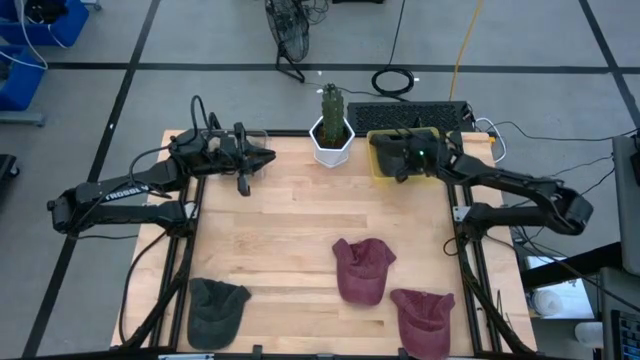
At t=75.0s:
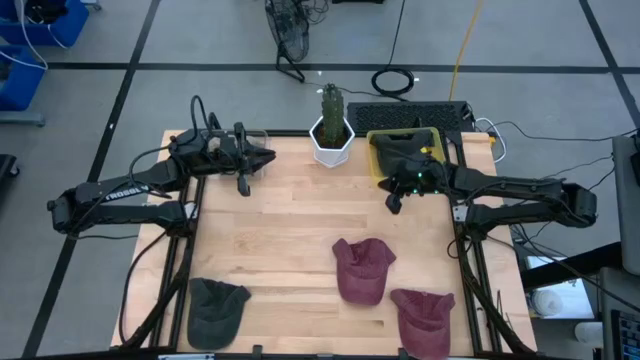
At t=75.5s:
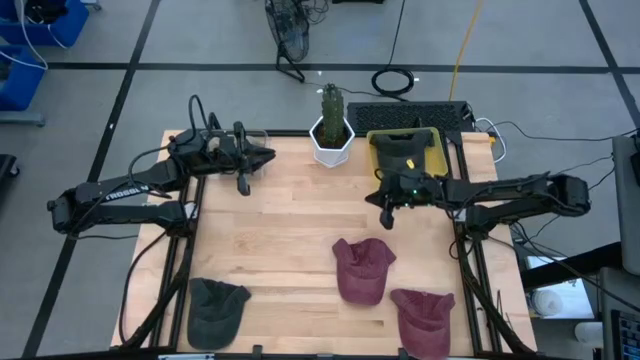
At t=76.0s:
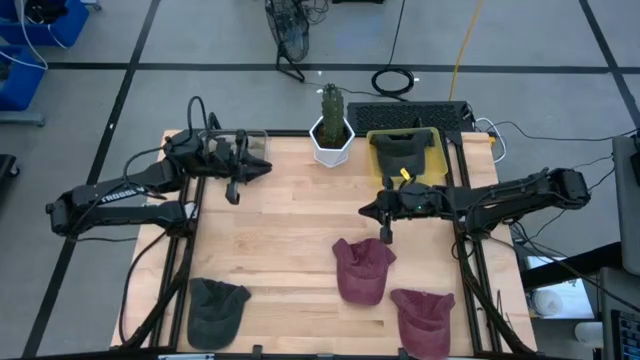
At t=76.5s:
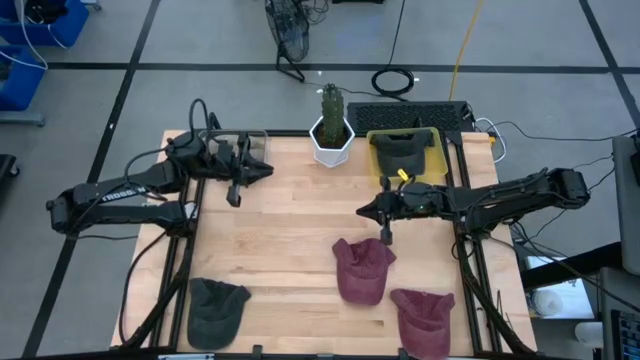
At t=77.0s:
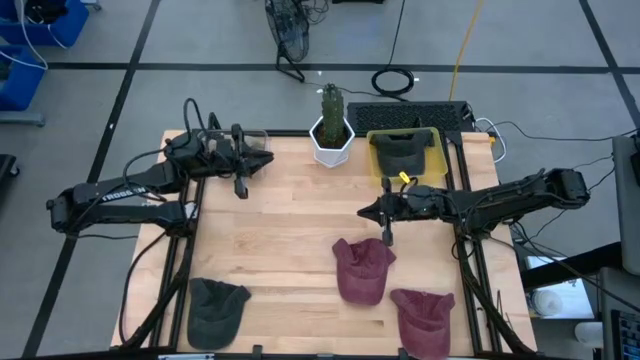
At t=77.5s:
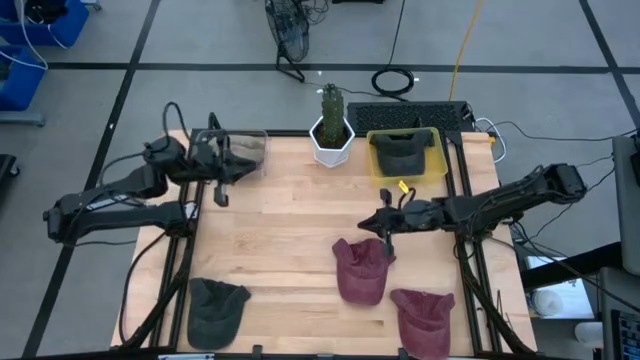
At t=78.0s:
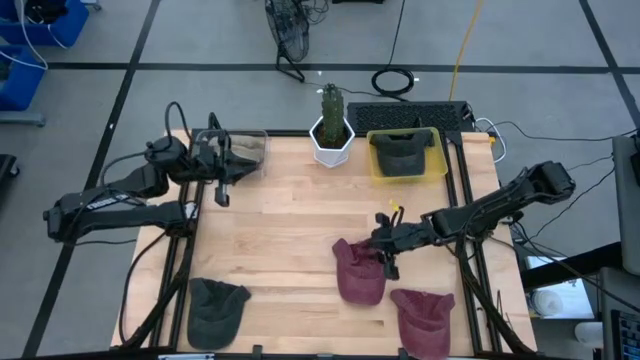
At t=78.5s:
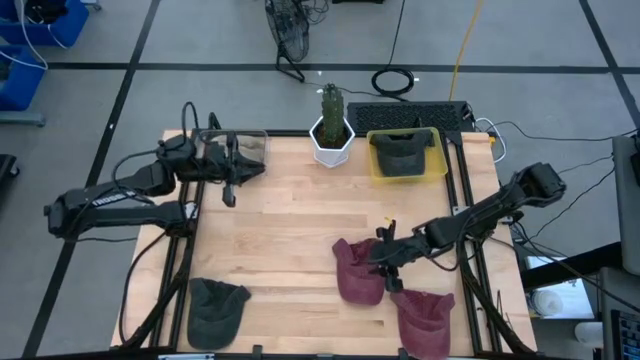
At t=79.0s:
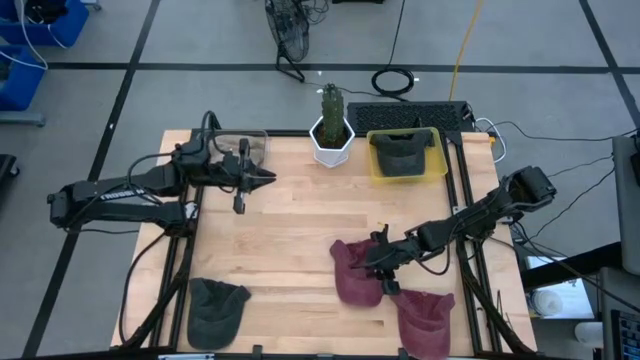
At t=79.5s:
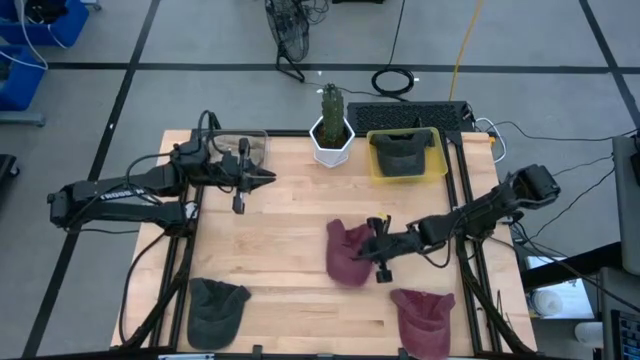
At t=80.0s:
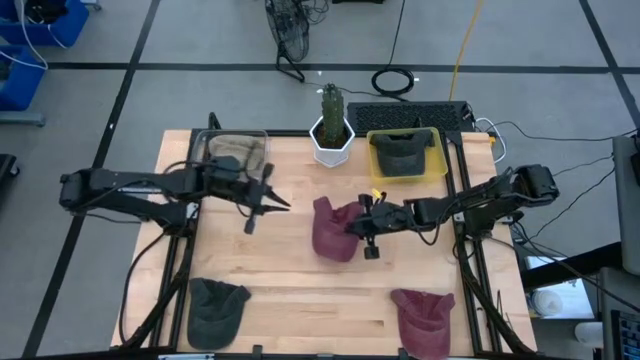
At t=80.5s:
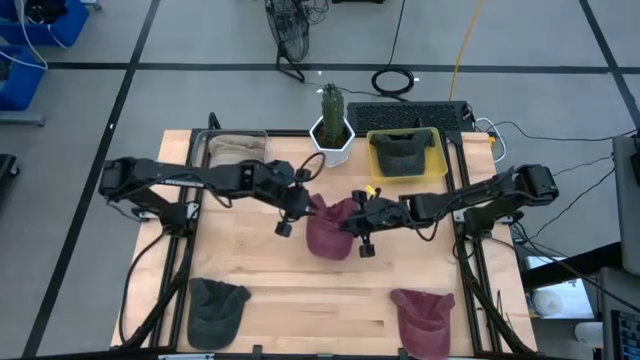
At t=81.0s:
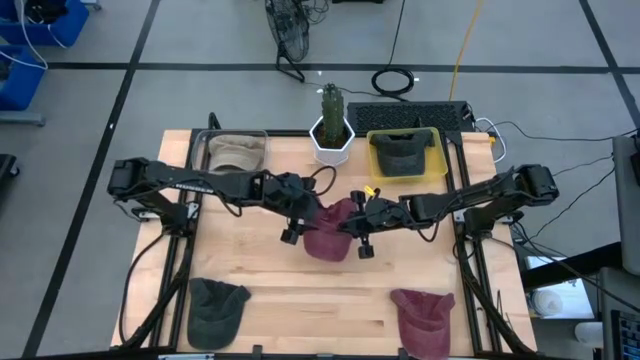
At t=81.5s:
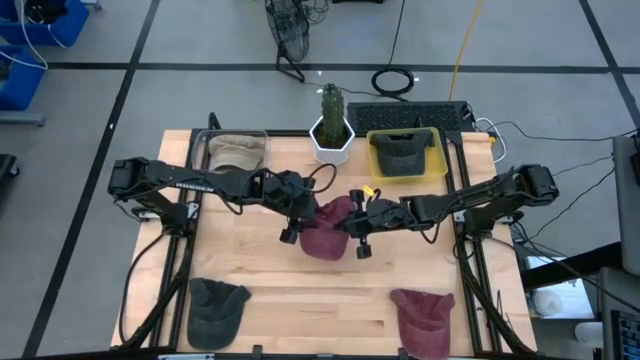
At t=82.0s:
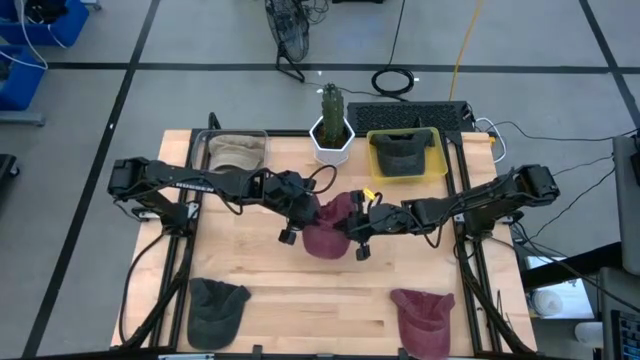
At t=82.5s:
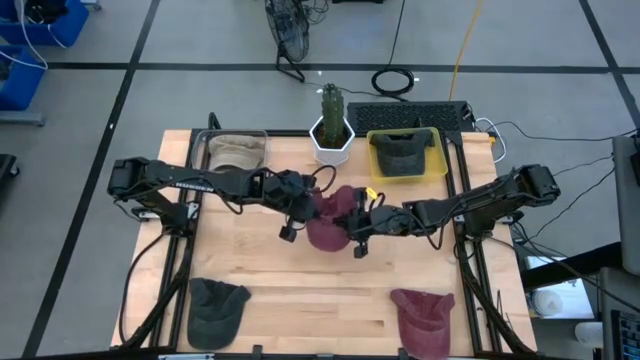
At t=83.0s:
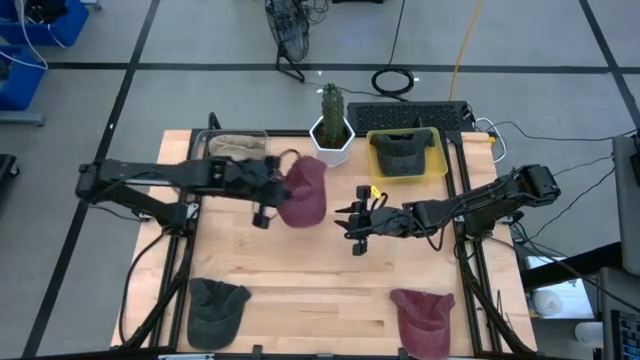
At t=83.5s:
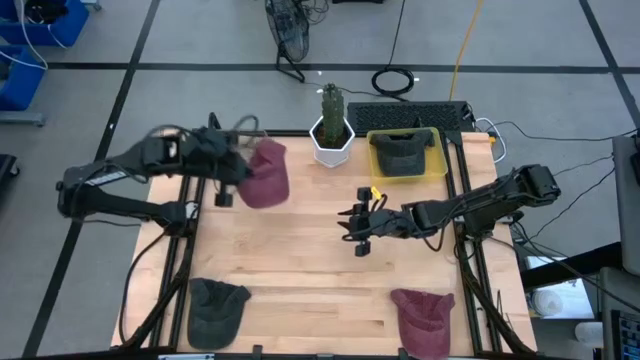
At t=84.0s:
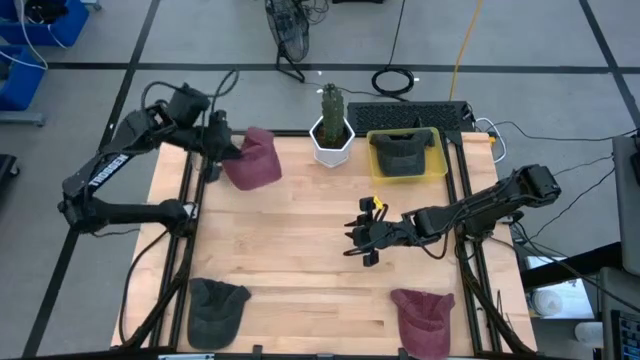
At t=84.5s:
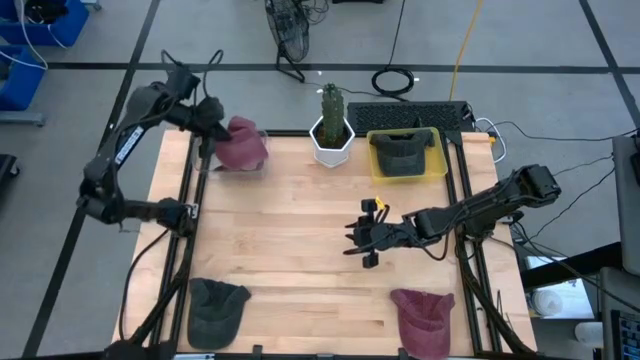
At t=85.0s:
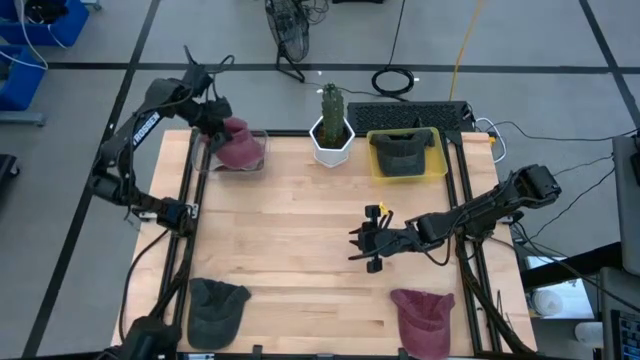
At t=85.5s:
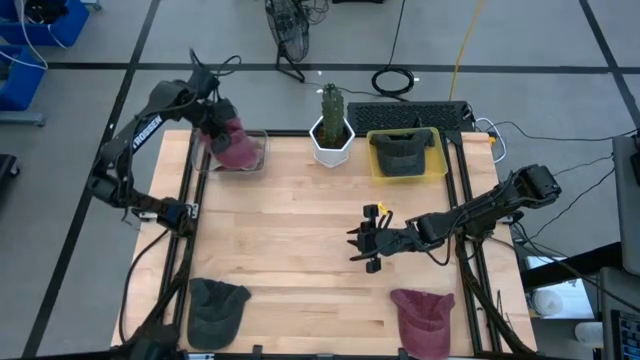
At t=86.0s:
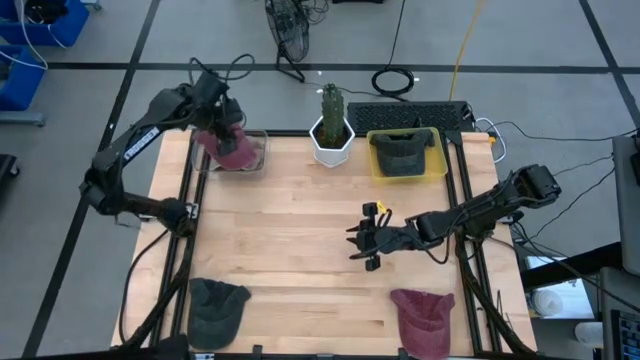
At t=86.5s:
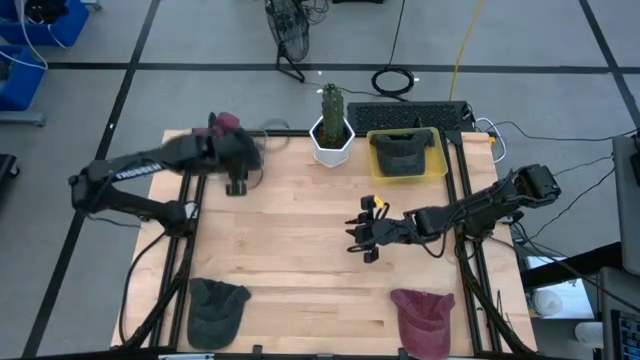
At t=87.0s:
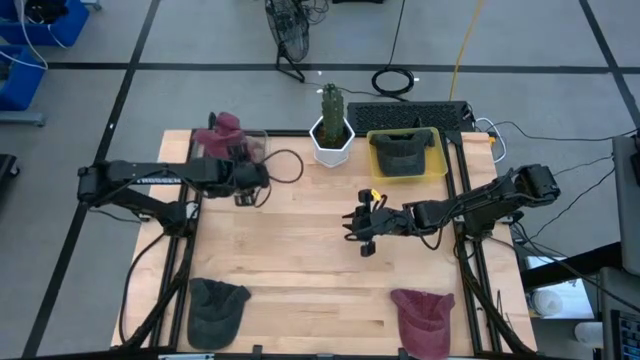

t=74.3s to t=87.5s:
Task: Pick & Place hat
Put the left red cap into the transparent bin

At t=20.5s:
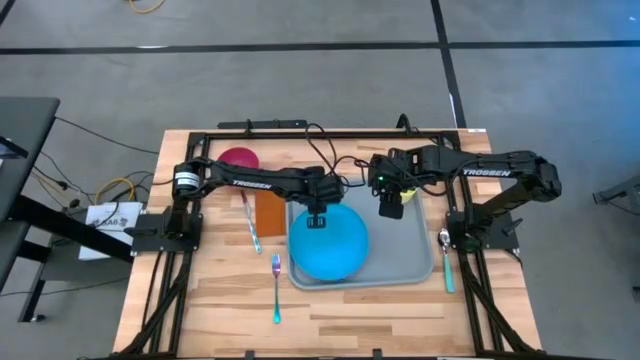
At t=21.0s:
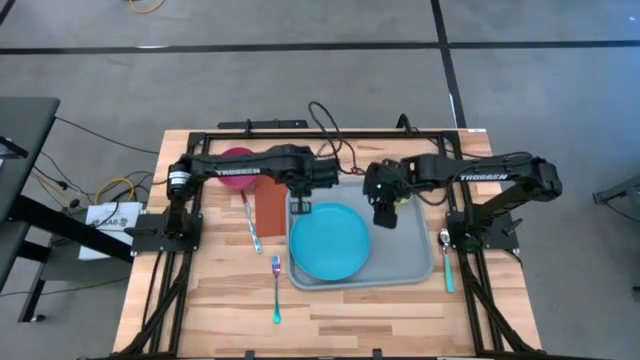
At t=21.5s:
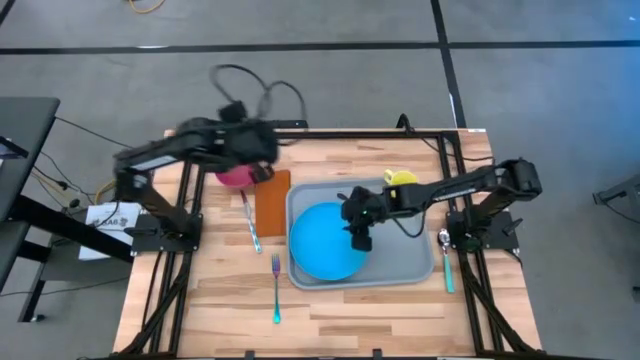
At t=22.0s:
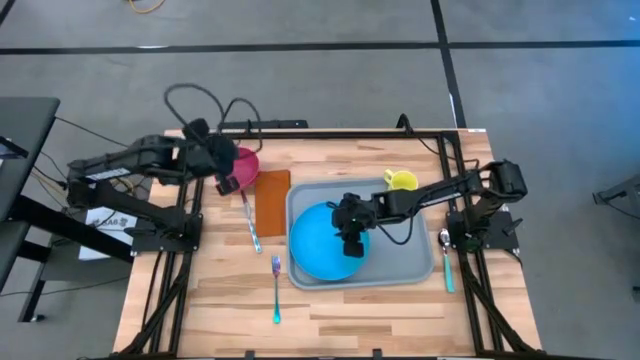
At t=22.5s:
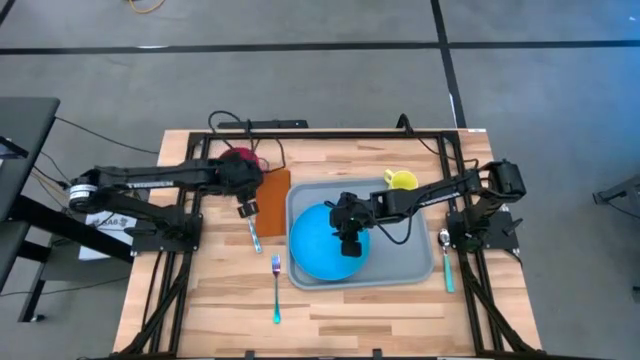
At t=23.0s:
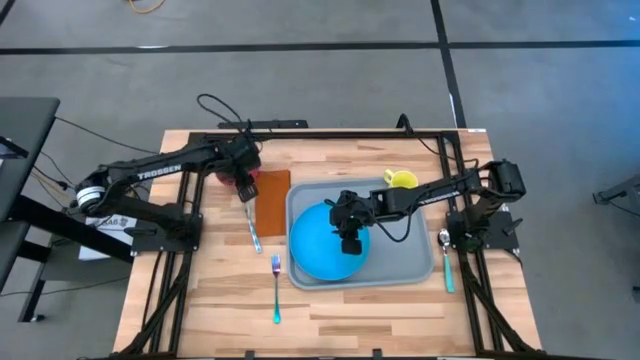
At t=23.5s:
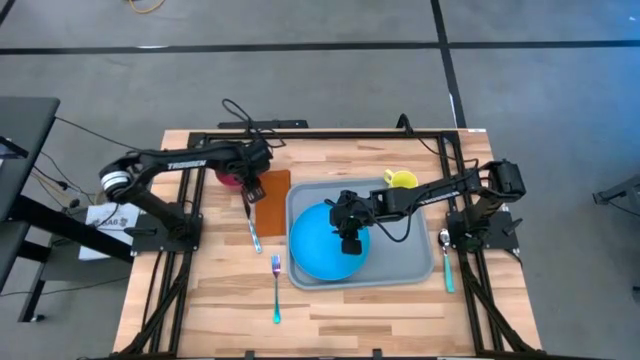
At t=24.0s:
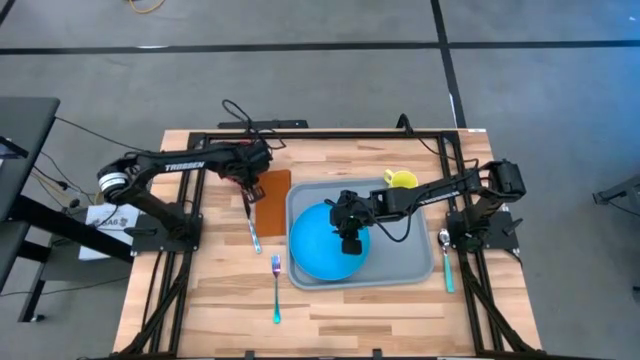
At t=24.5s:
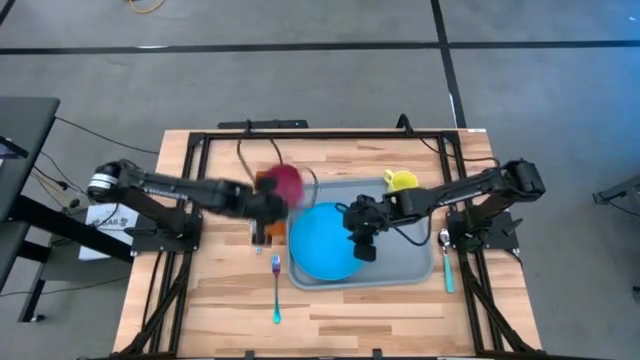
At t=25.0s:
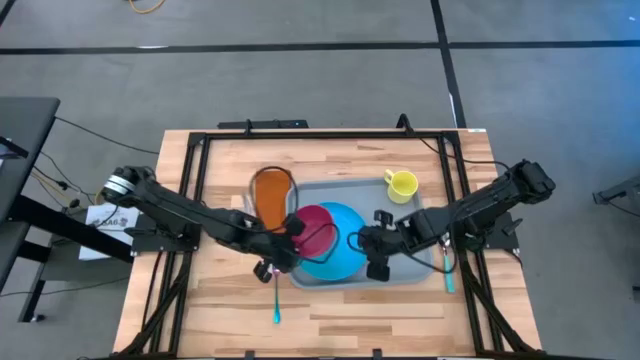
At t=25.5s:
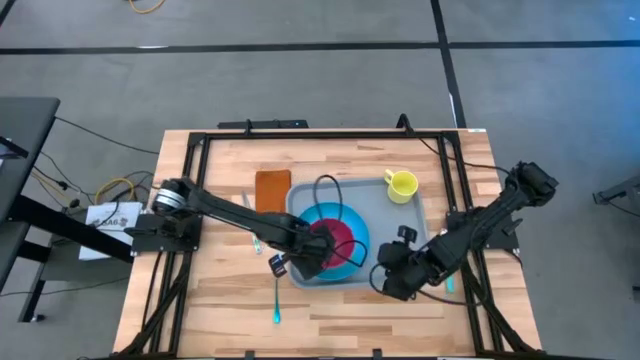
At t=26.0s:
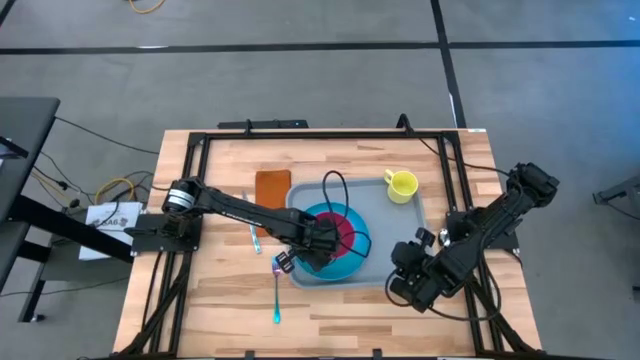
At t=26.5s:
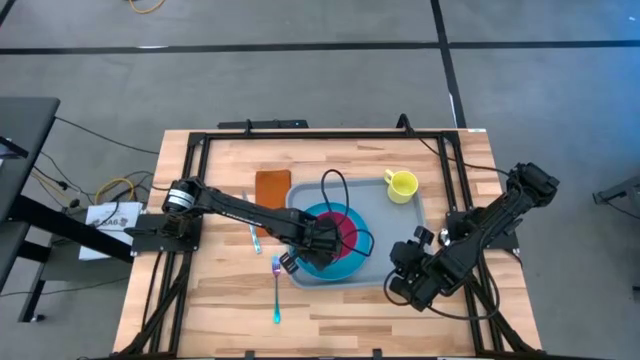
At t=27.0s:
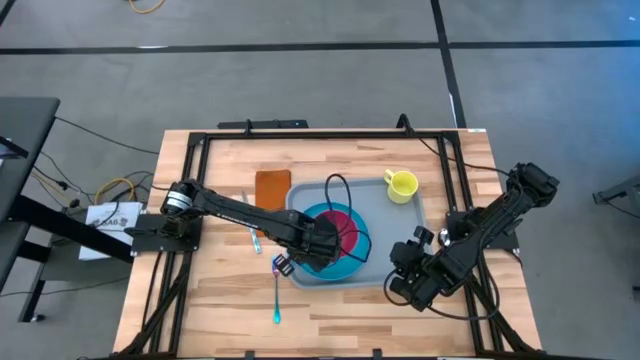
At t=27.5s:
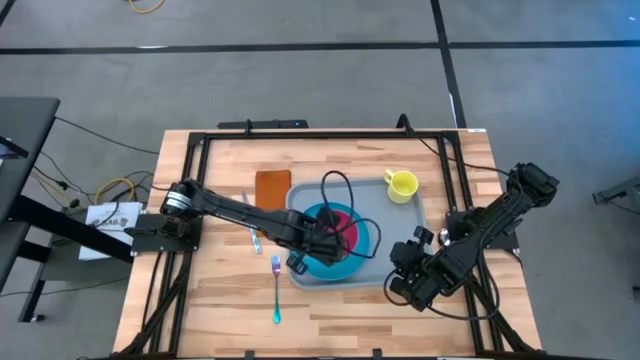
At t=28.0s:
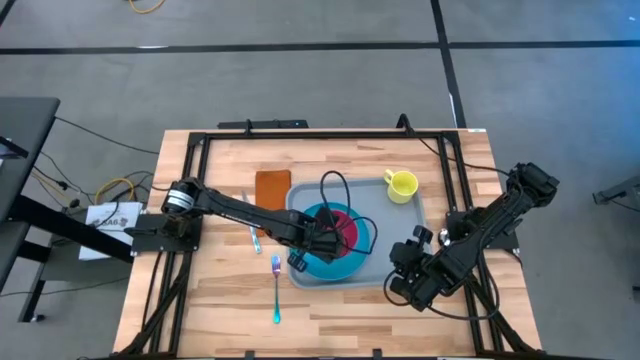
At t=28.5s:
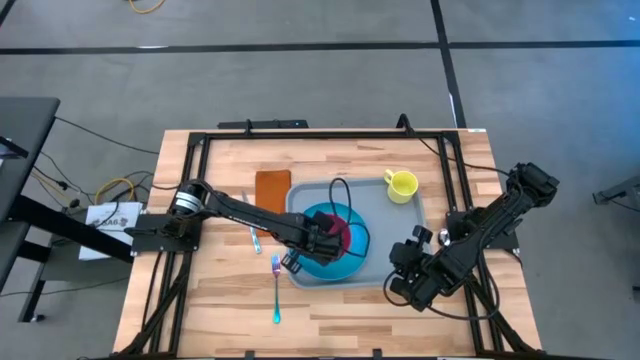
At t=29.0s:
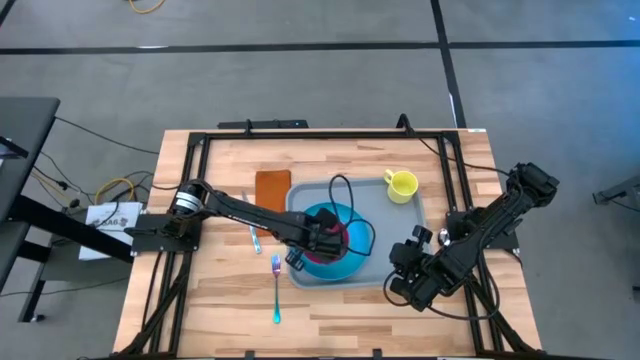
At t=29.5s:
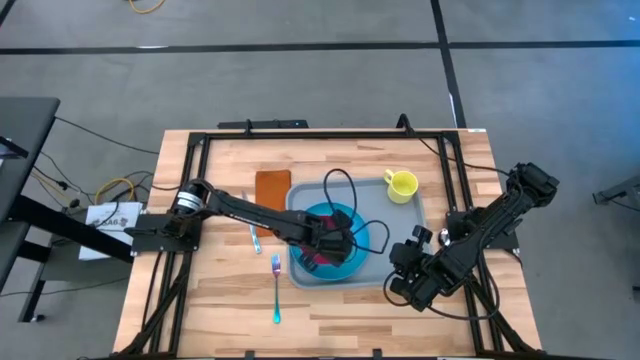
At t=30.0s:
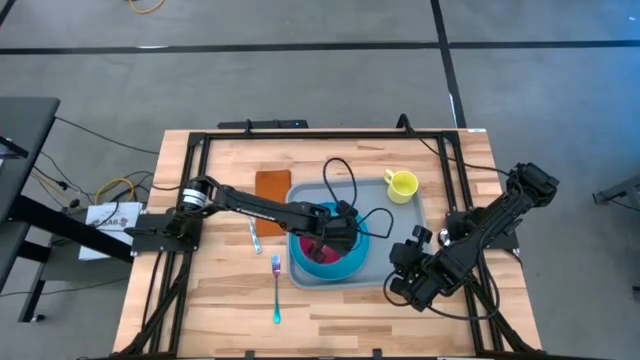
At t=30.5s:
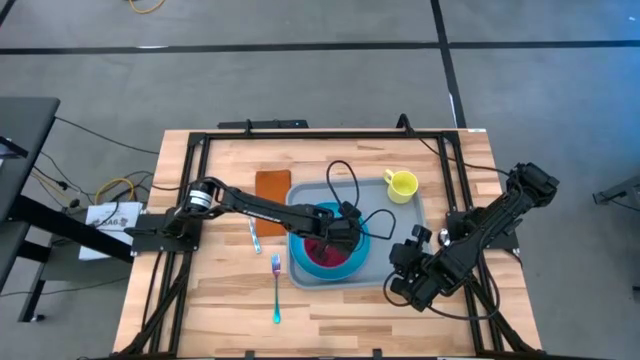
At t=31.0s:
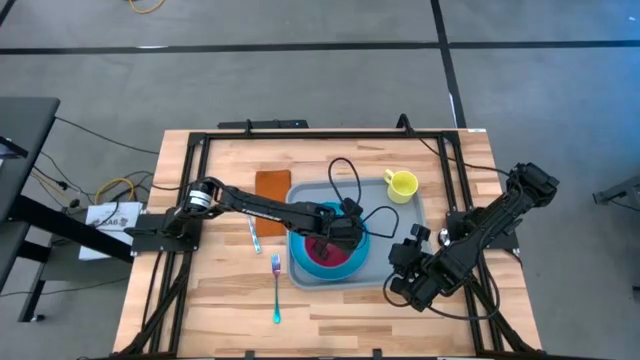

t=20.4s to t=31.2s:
Task: Set up tray
Put the pink bowl on the blue plate to the bottom left of the yellow mug
